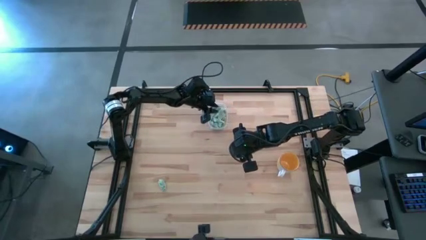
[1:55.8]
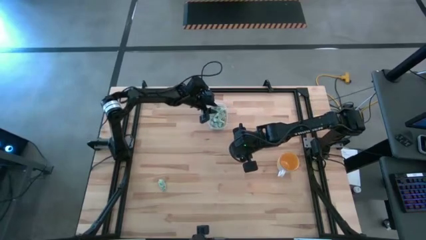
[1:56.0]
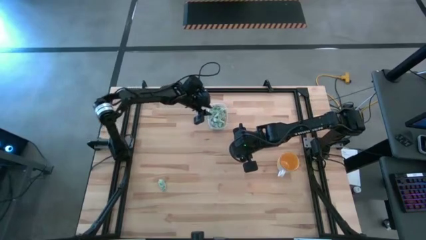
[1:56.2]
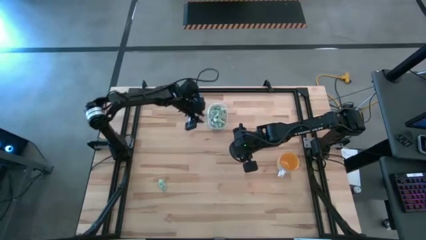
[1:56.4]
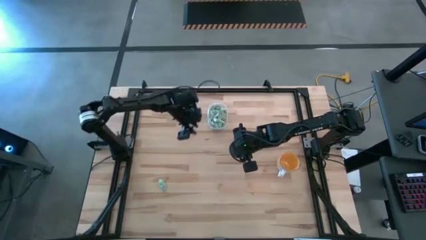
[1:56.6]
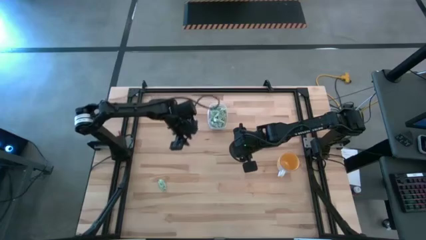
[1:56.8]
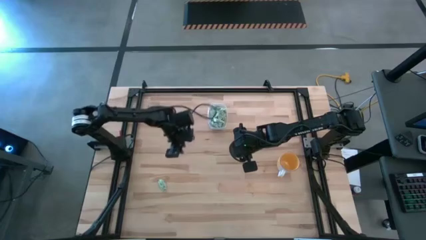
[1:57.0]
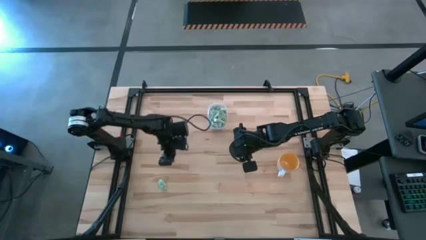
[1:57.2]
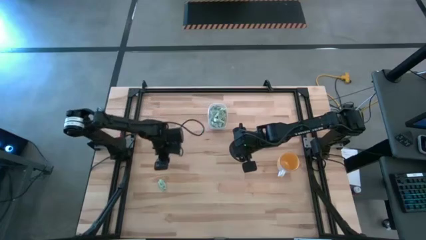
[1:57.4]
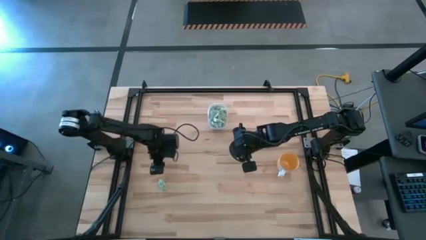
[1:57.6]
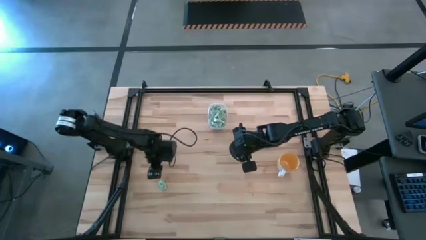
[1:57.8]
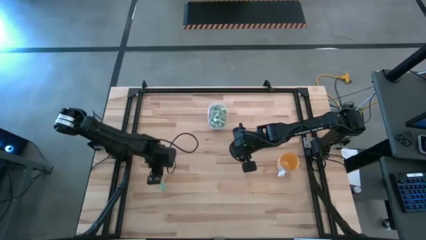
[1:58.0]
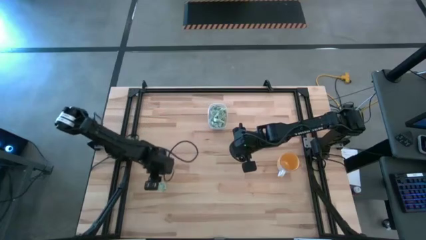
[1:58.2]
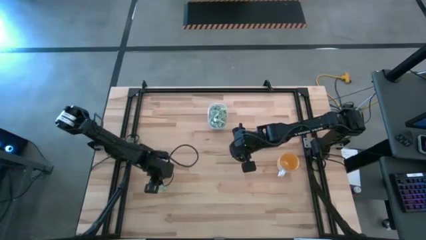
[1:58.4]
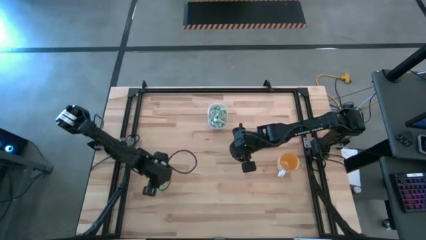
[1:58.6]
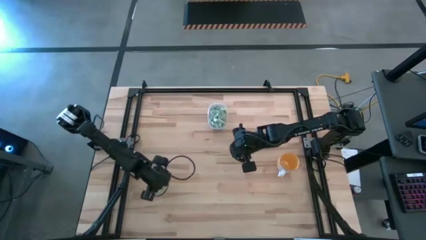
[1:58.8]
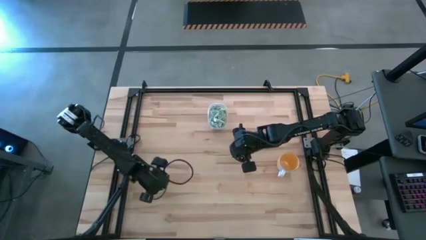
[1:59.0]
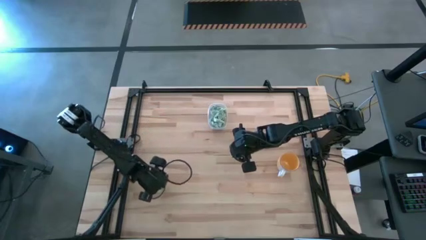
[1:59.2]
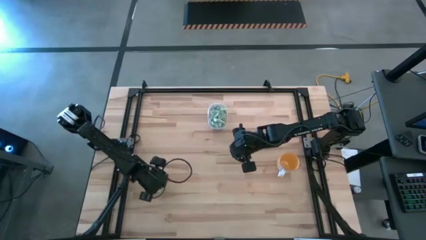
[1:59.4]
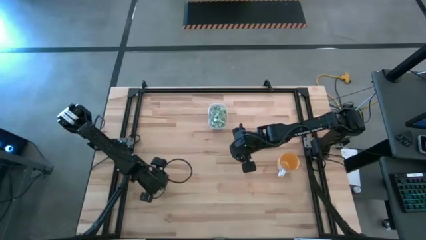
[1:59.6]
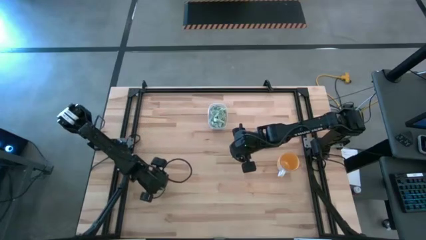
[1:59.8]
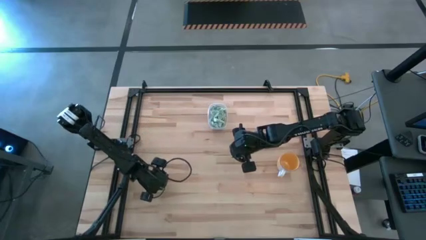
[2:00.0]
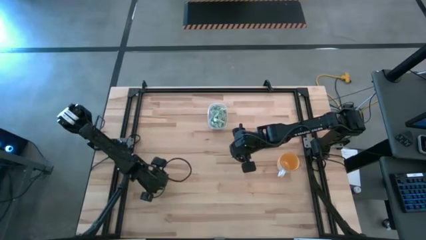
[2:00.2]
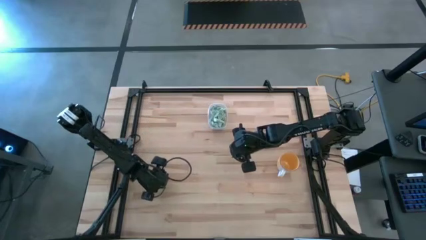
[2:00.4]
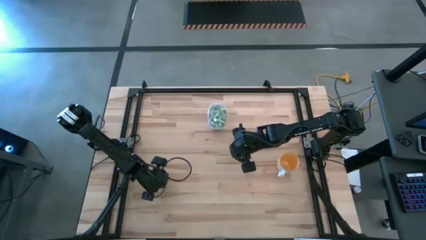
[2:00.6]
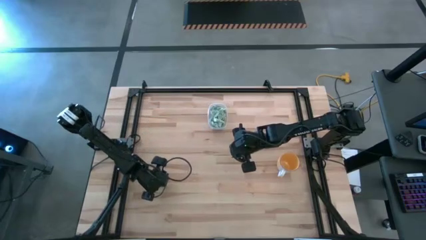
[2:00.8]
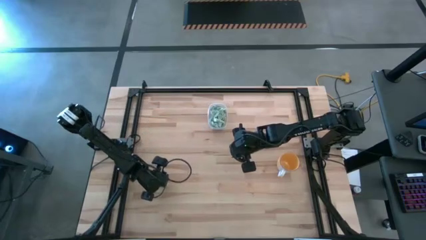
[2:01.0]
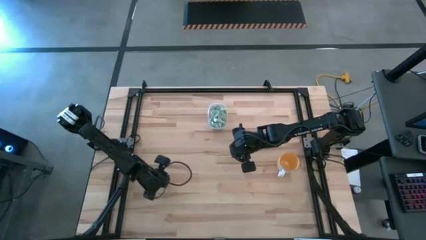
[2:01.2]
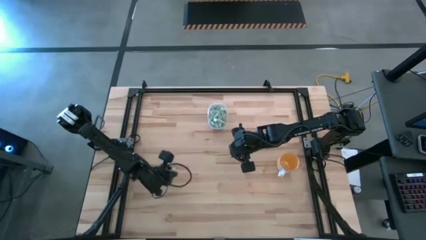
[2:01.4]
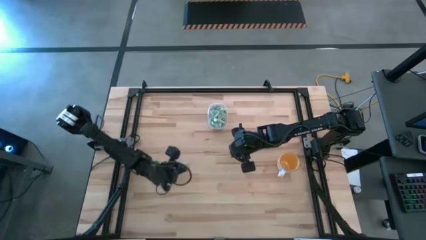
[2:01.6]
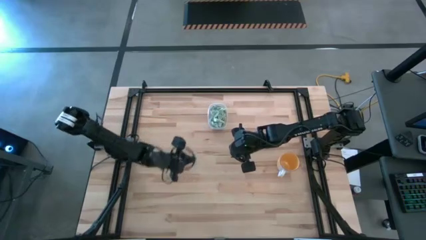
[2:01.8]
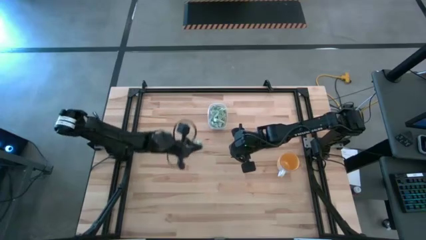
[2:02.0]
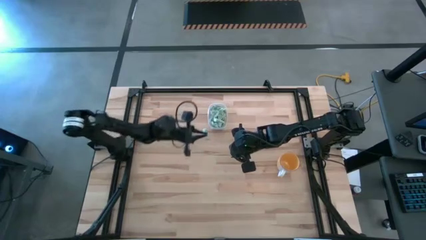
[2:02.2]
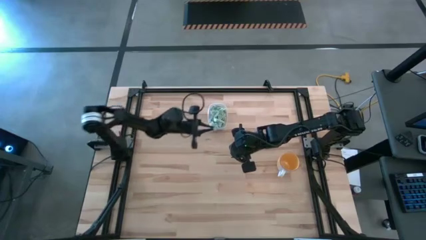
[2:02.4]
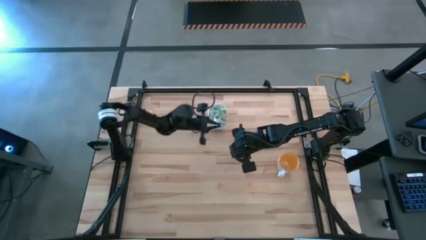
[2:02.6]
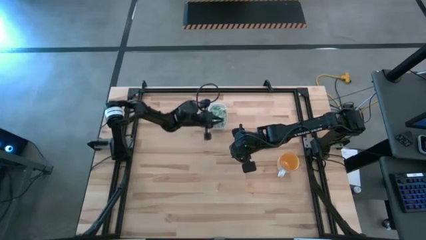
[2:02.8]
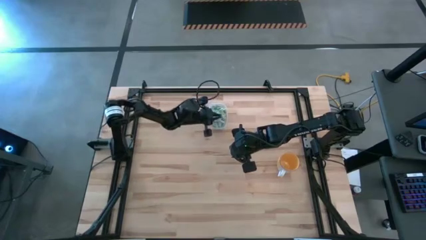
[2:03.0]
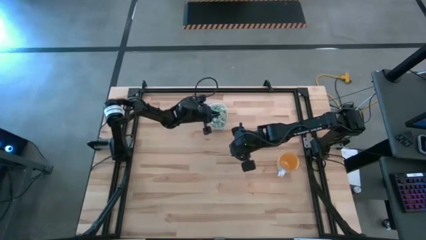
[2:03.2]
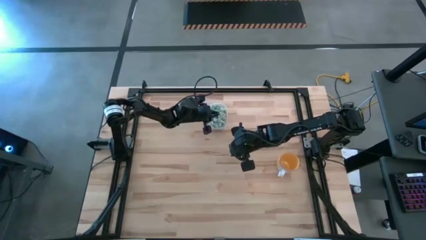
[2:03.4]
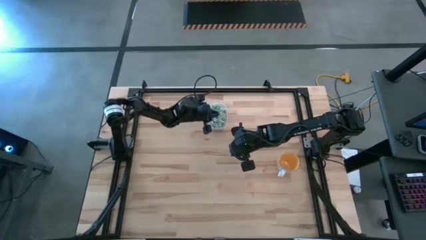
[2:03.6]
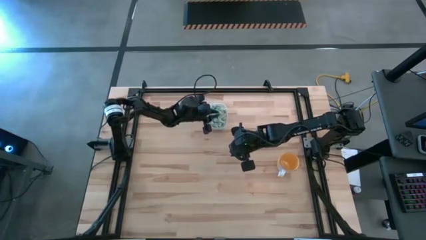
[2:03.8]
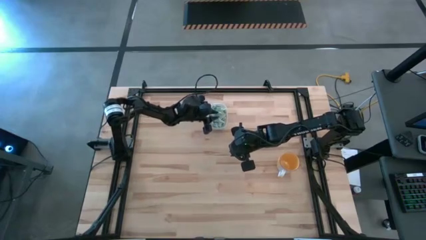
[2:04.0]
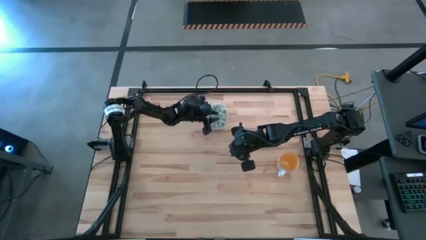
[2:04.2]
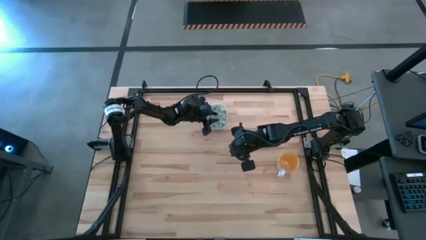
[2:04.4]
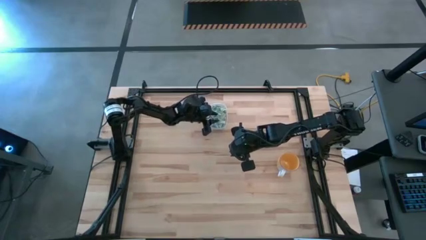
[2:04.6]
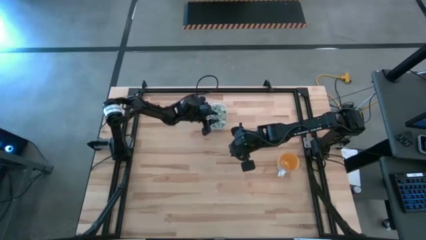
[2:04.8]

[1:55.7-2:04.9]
Task: Pick and place Stevia / Truvia into bins
Put the green stevia packet into the transparent bin

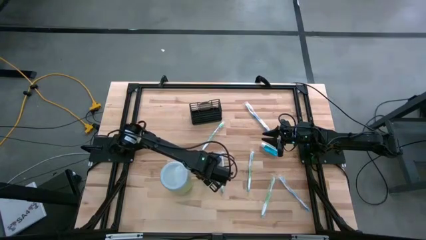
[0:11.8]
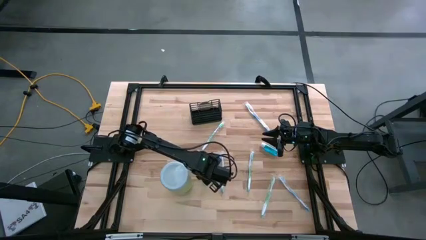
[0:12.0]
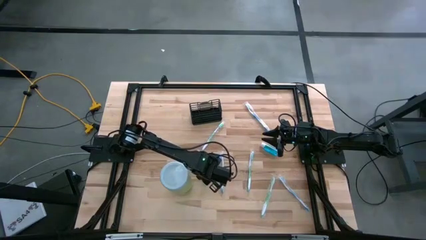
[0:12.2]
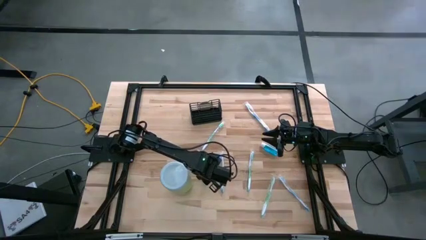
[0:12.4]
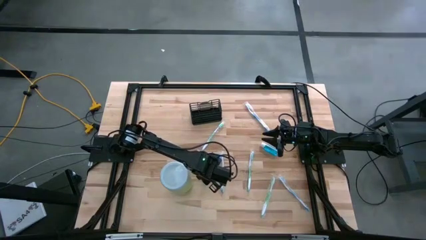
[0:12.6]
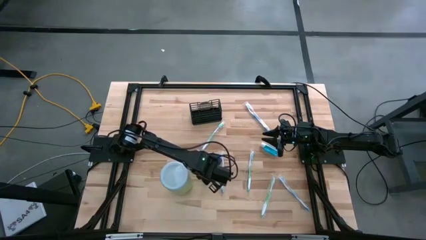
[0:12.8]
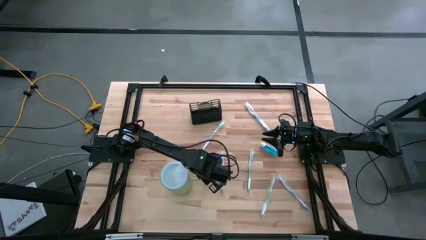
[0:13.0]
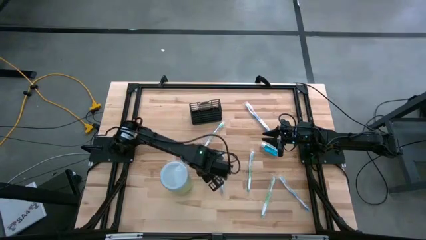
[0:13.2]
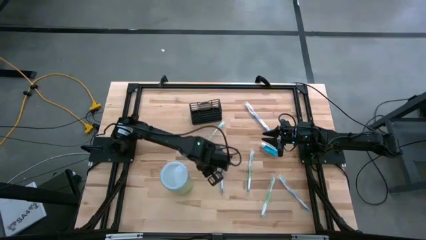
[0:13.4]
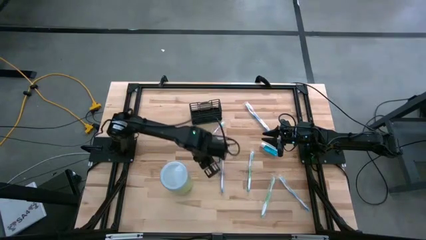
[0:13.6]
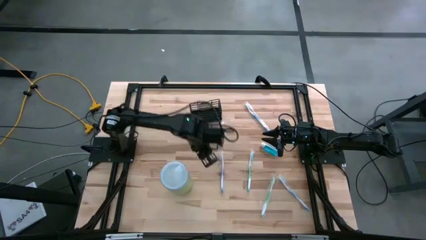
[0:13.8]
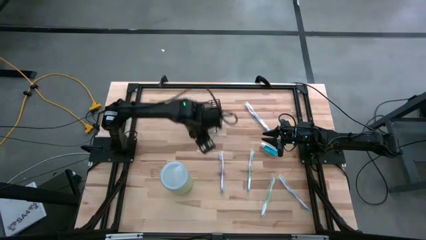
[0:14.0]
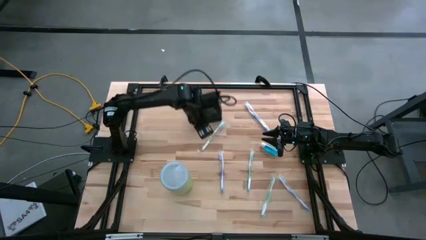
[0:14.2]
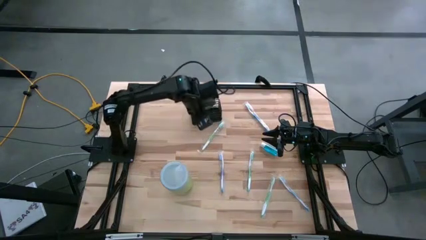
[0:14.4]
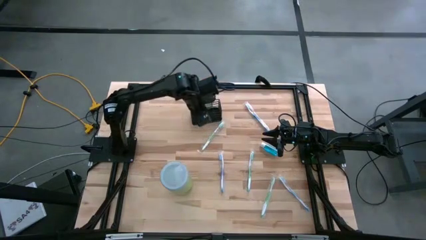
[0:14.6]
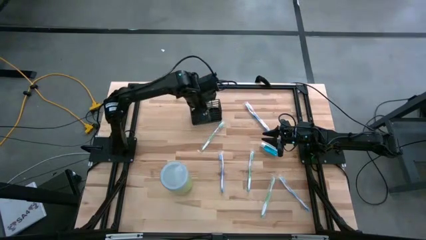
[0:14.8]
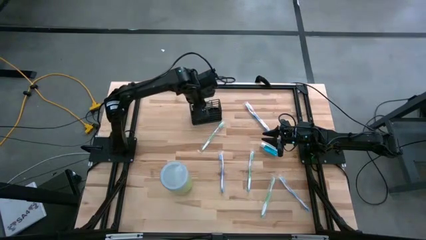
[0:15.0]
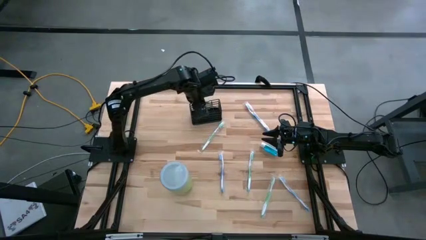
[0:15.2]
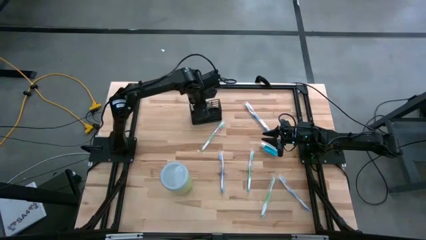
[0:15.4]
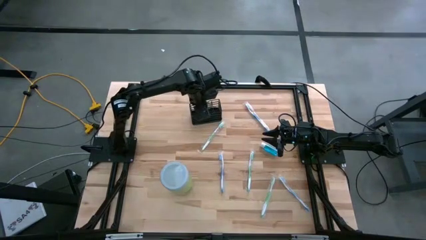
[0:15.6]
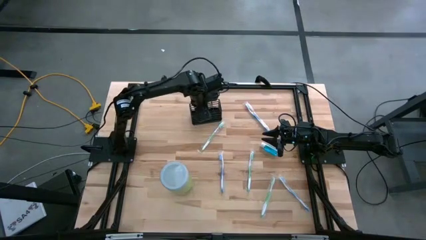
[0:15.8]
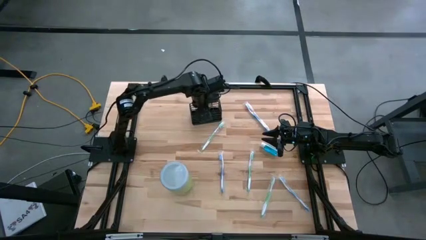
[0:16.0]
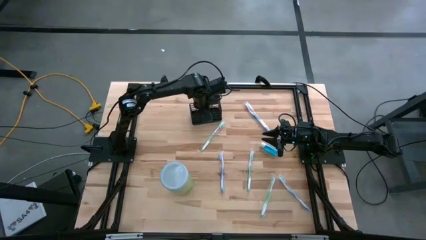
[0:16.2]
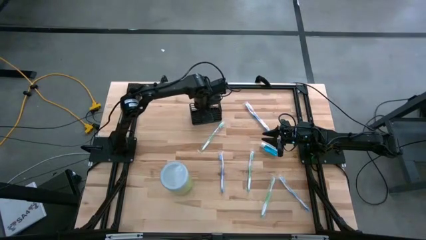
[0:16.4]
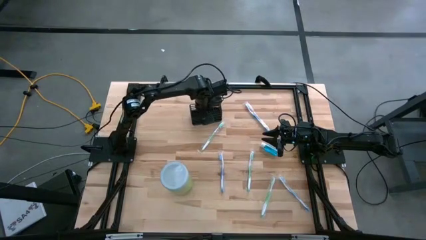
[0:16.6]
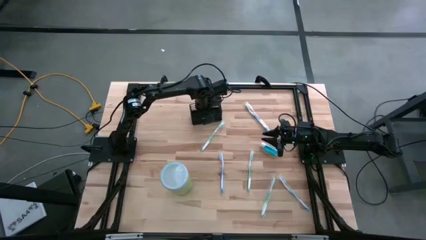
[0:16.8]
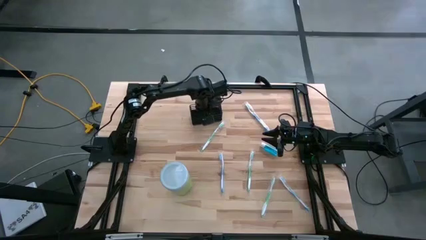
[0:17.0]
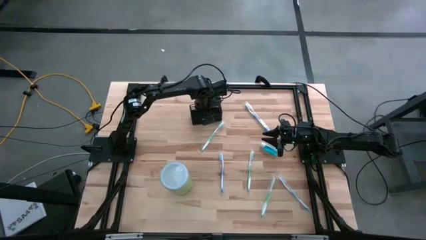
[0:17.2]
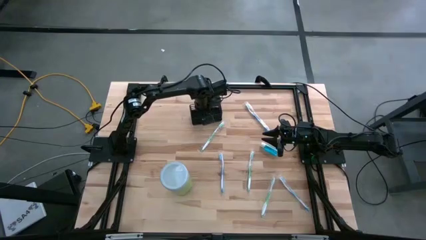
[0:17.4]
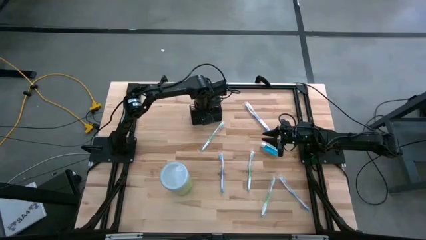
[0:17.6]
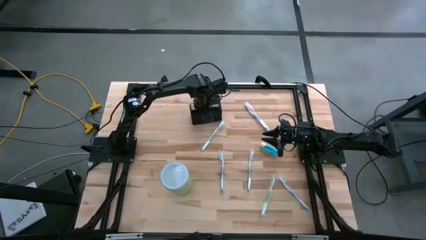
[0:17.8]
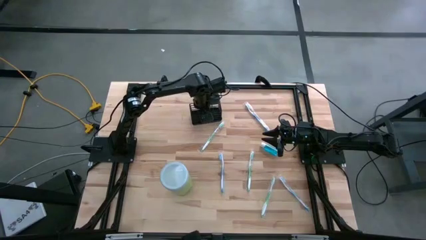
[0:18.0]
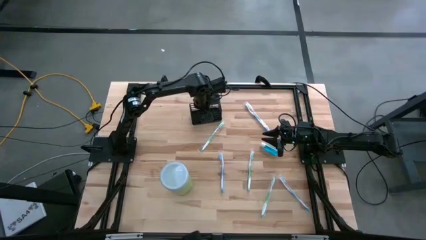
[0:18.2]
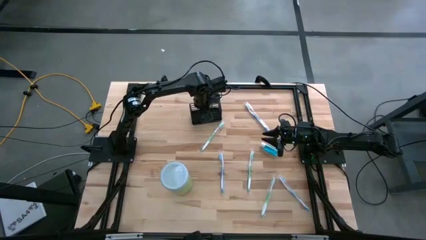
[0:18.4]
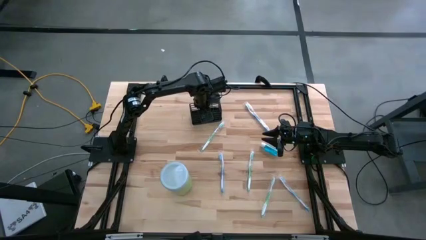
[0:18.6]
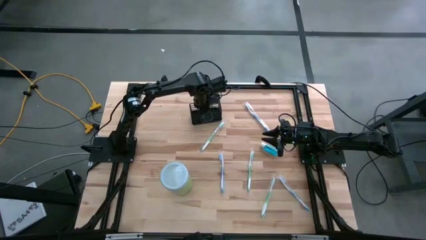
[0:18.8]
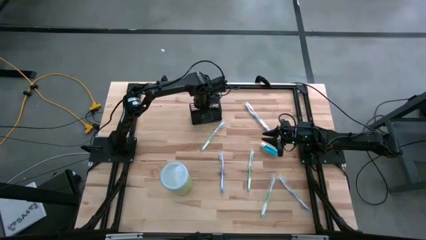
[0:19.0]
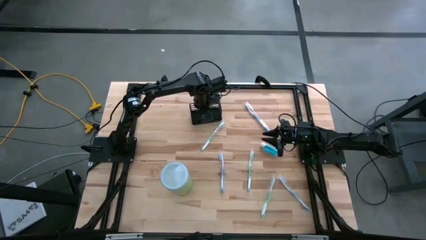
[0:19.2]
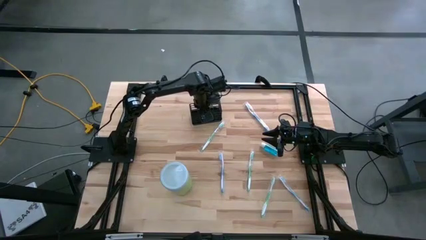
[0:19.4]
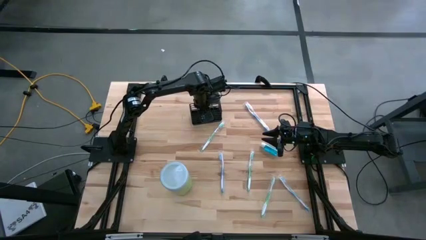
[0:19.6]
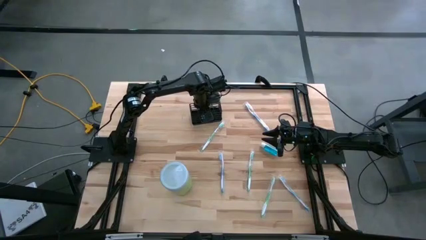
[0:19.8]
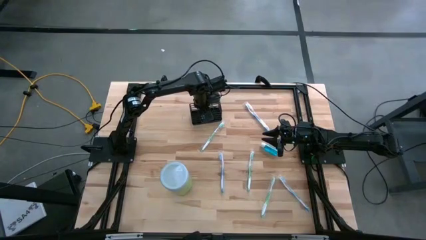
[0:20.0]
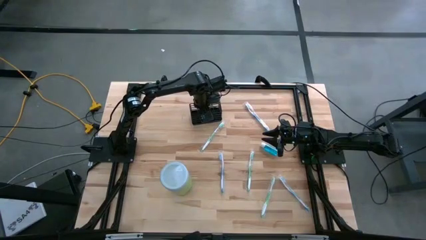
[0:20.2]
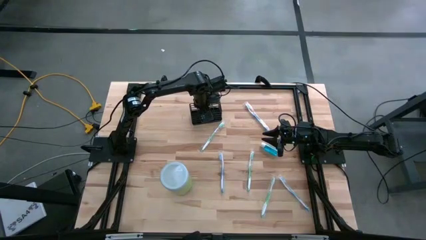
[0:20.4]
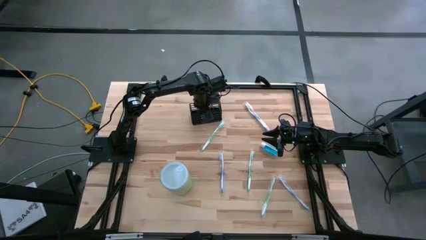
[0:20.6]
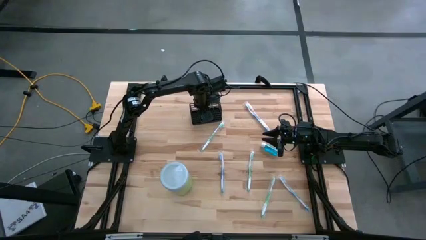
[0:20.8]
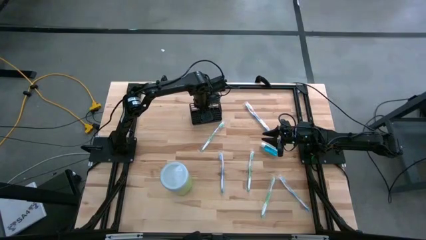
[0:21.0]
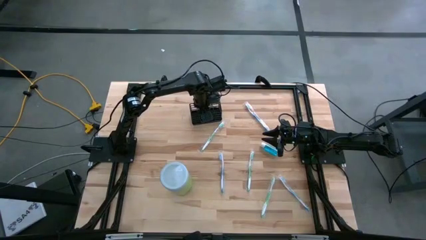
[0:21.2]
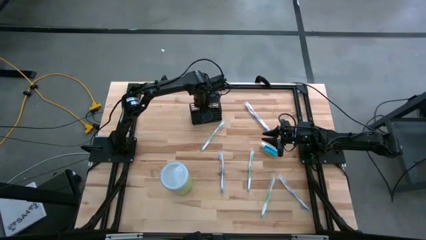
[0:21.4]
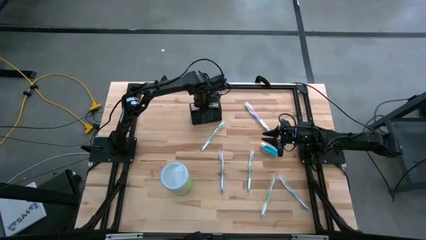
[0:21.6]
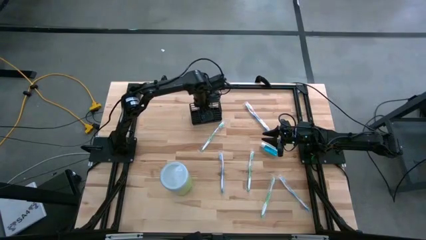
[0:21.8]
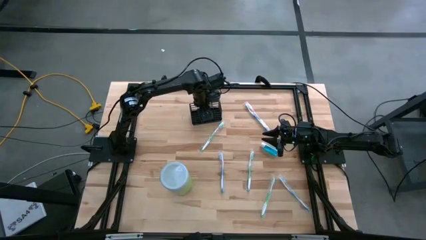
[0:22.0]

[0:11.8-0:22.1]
Task: Pick & Place toothbrushing station
Put the bottom blue mouthwash into the black mesh mesh mesh organizer
